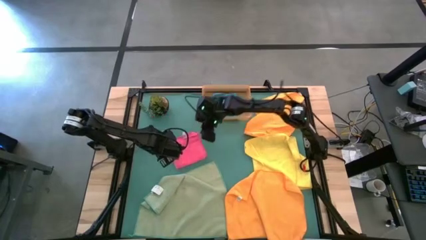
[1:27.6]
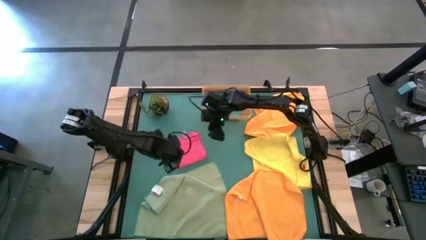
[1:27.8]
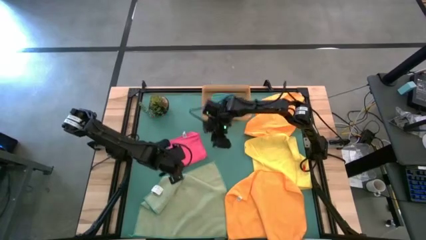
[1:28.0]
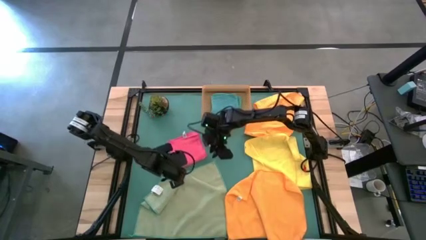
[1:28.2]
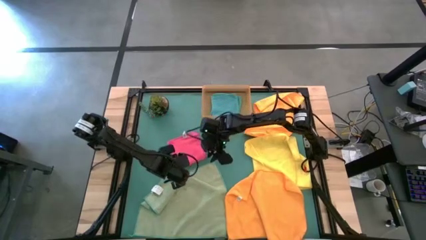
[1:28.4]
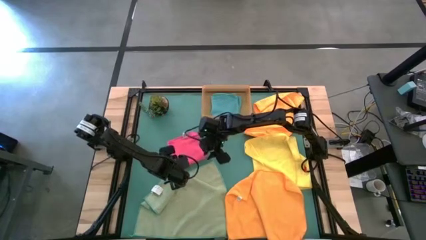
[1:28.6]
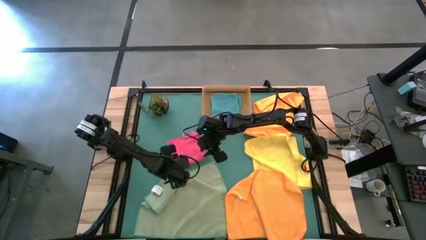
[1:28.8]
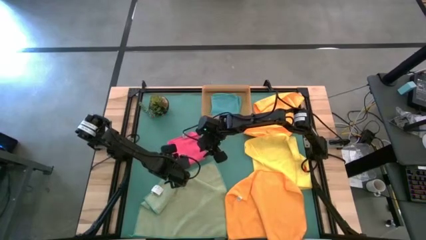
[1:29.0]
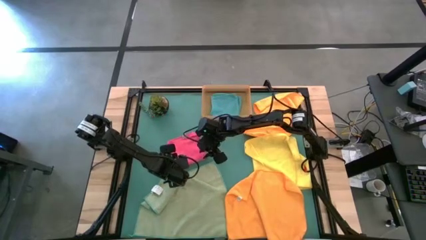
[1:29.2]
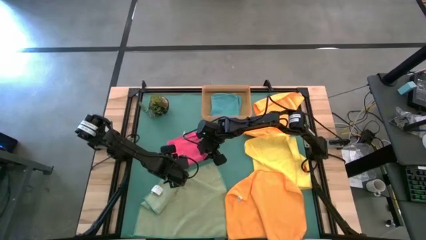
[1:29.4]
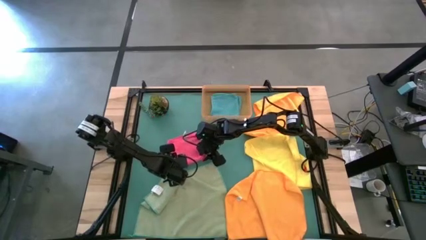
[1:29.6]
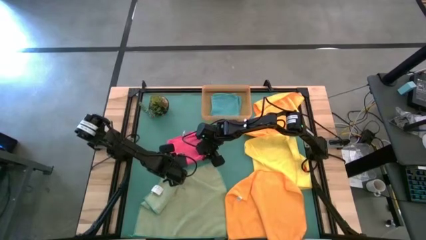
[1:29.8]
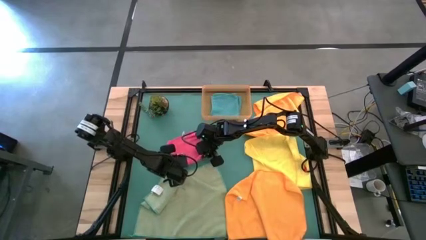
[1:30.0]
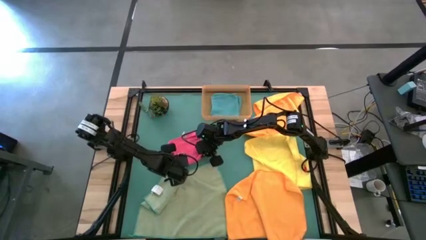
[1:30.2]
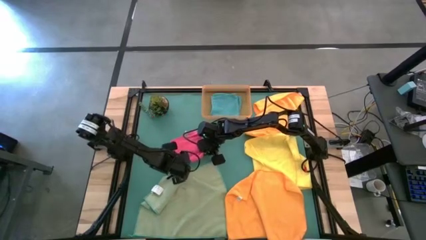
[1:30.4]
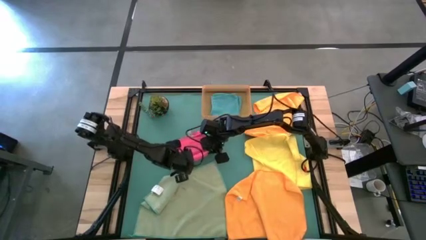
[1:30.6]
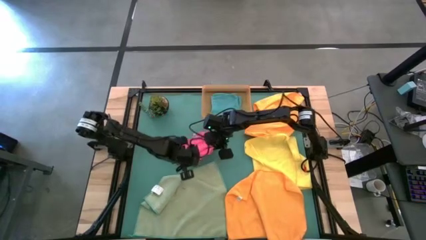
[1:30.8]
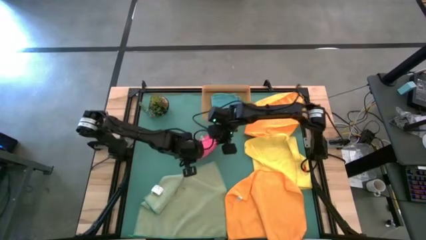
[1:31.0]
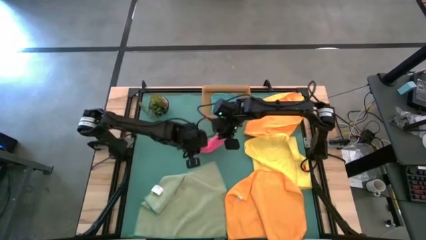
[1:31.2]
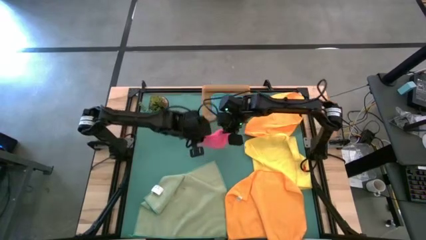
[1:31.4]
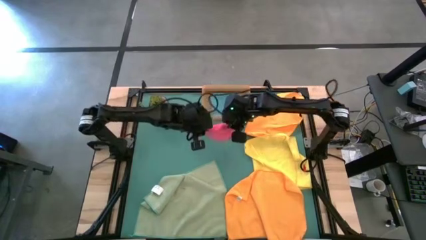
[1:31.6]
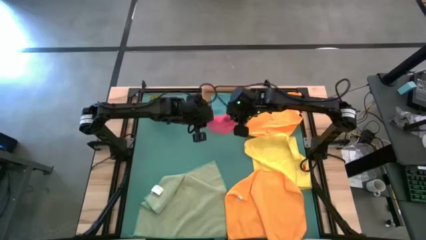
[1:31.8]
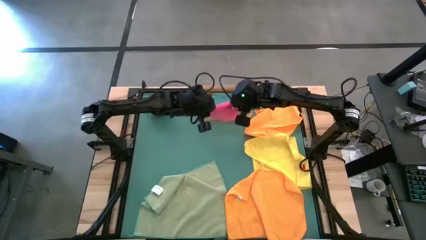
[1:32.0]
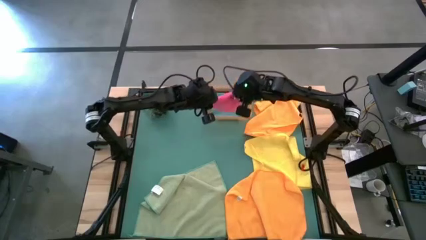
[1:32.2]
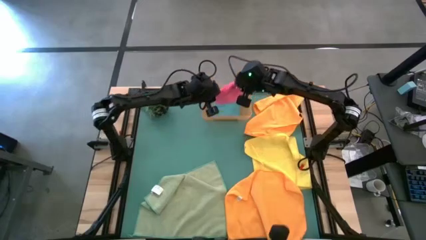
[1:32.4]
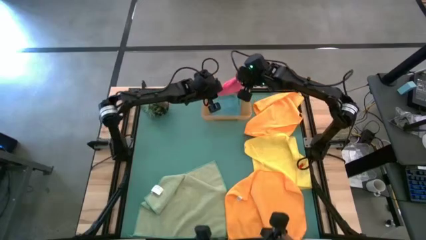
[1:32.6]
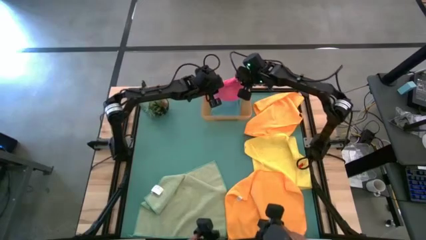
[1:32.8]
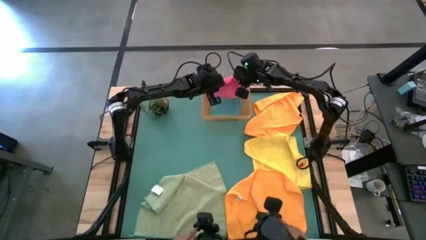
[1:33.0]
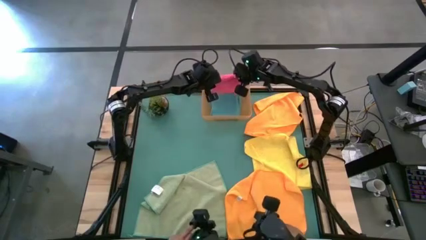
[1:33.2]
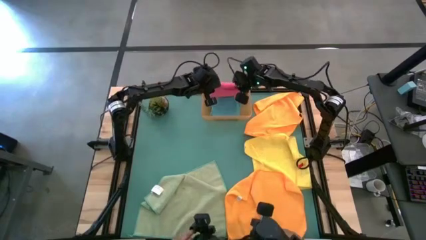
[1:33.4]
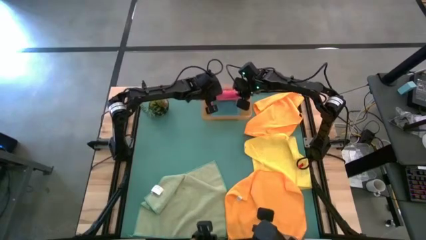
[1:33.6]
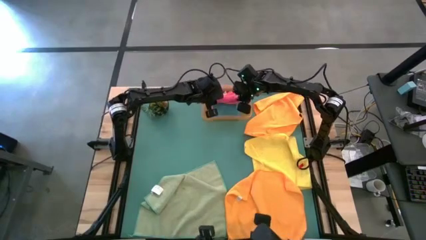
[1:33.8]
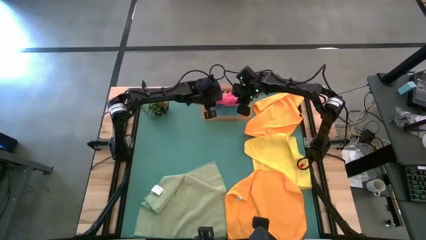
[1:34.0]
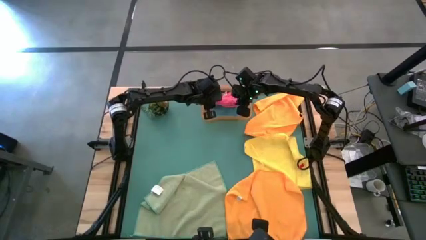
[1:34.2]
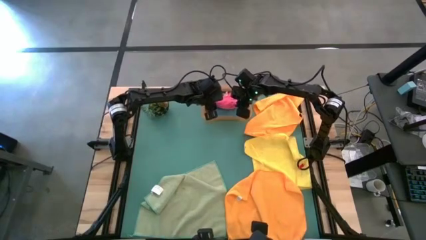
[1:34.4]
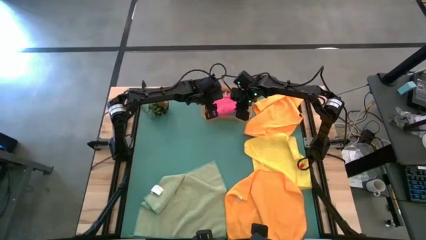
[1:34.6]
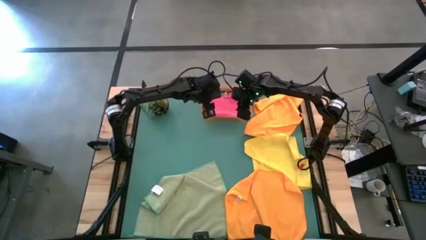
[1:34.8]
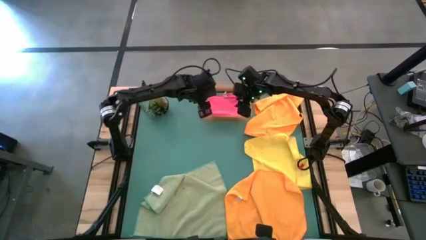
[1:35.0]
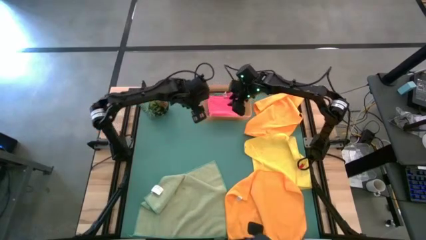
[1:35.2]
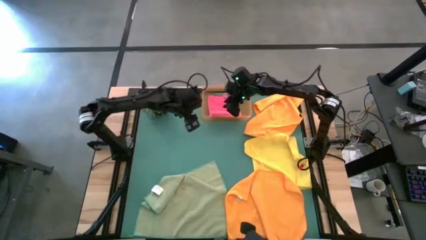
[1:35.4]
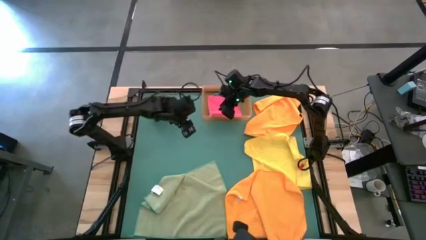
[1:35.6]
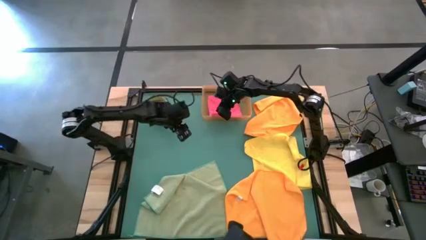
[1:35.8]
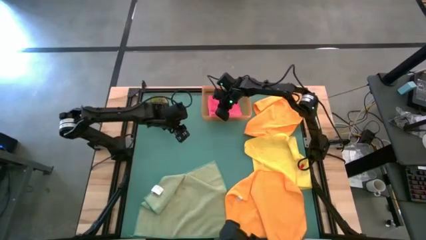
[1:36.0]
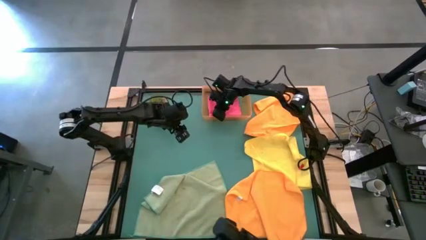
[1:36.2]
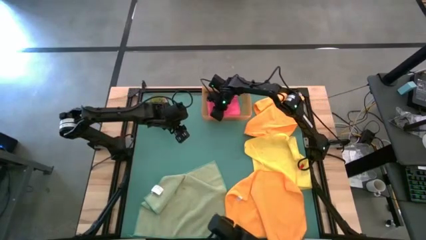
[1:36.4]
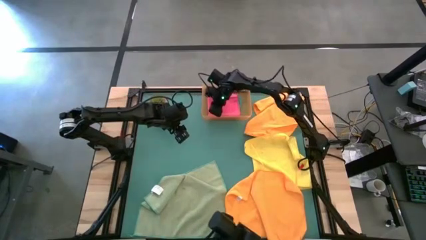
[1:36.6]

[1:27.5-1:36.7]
Task: Fold microfiber towels
Stack the pink microfiber towel on top of the blue microfiber towel in the orange bin

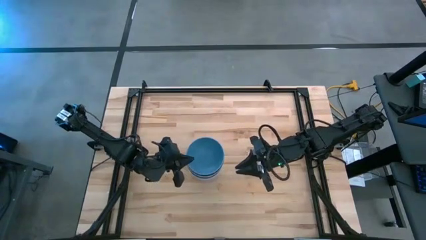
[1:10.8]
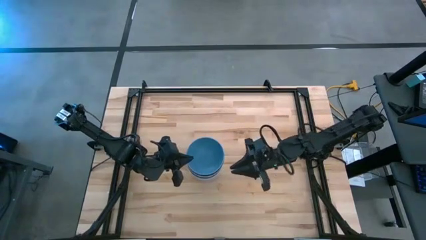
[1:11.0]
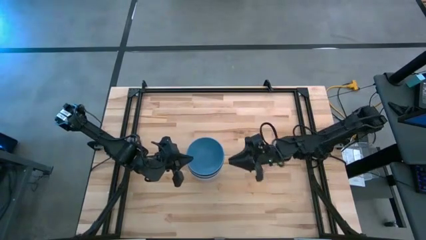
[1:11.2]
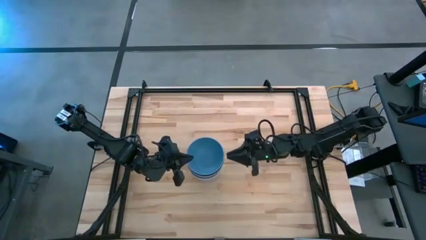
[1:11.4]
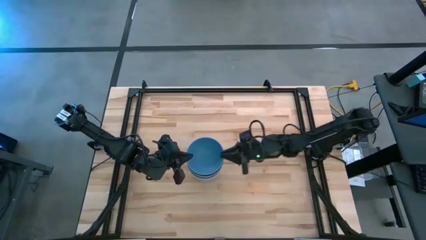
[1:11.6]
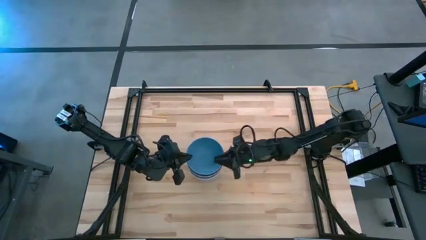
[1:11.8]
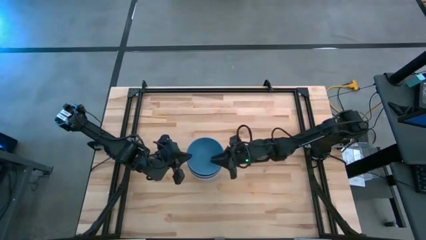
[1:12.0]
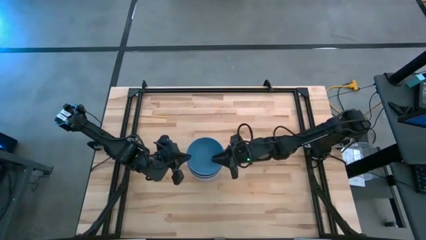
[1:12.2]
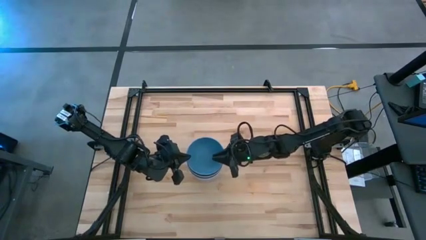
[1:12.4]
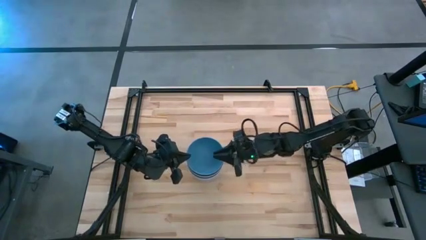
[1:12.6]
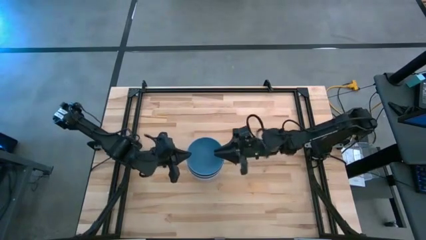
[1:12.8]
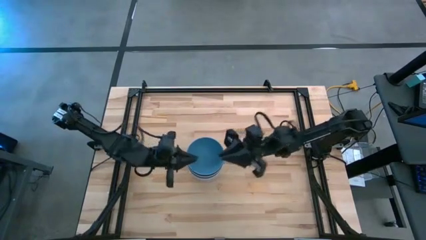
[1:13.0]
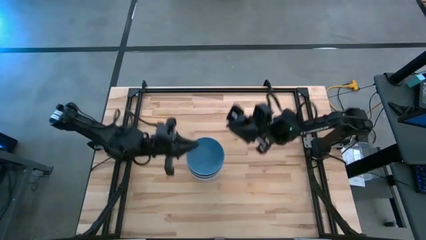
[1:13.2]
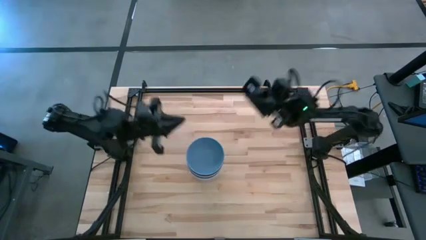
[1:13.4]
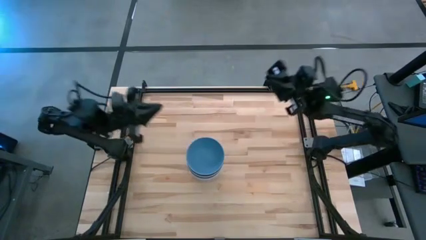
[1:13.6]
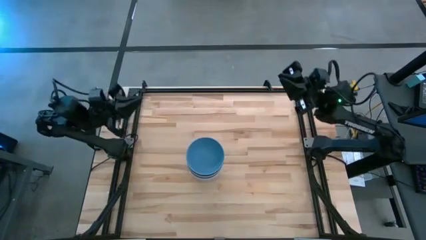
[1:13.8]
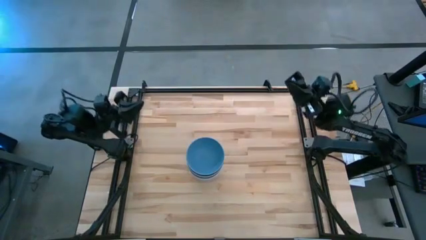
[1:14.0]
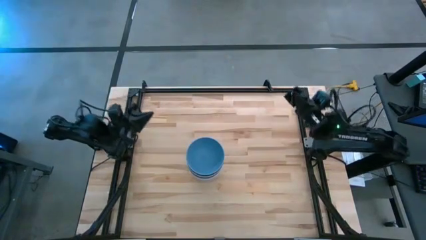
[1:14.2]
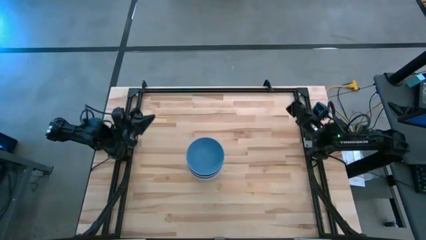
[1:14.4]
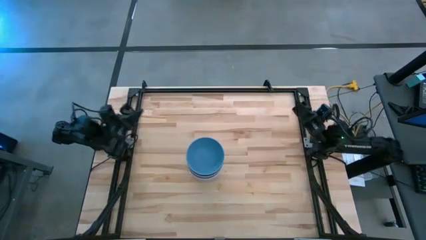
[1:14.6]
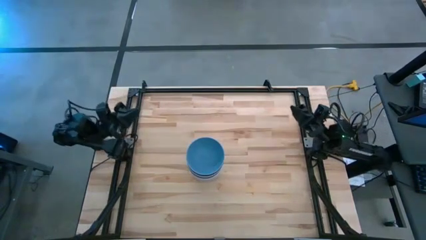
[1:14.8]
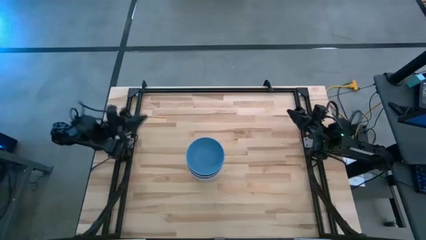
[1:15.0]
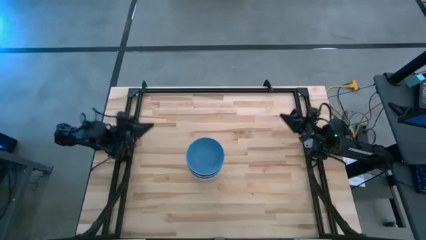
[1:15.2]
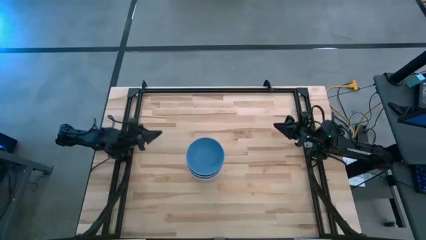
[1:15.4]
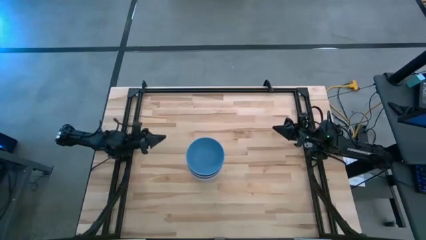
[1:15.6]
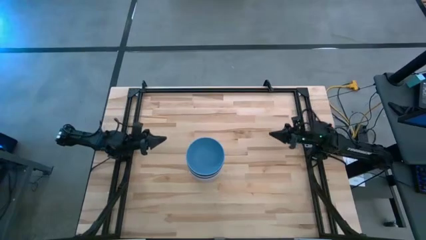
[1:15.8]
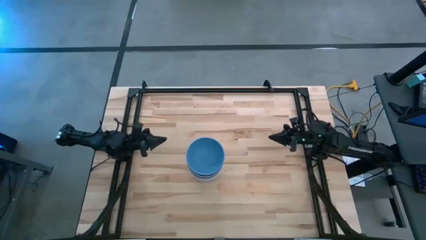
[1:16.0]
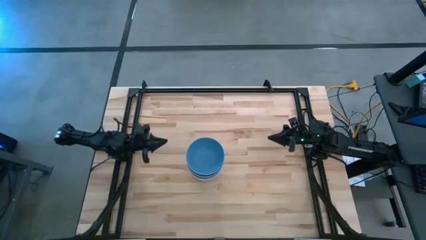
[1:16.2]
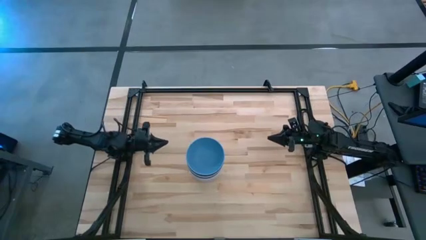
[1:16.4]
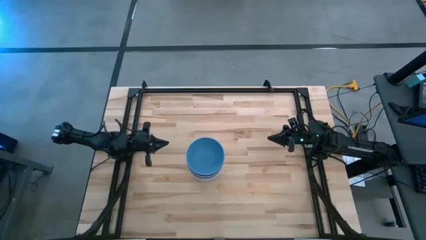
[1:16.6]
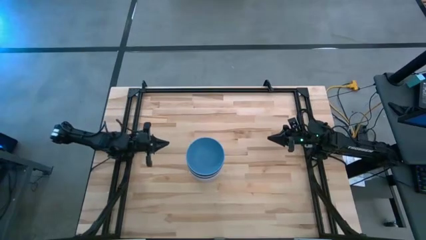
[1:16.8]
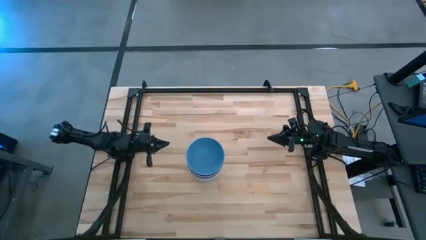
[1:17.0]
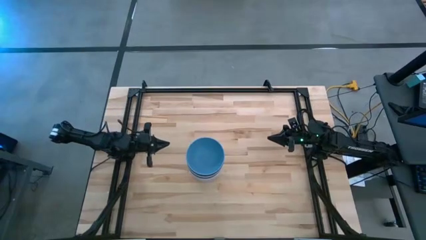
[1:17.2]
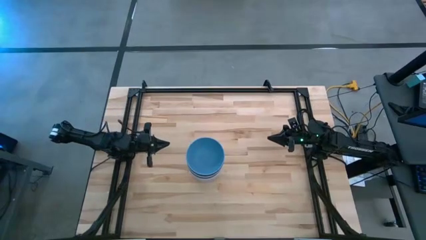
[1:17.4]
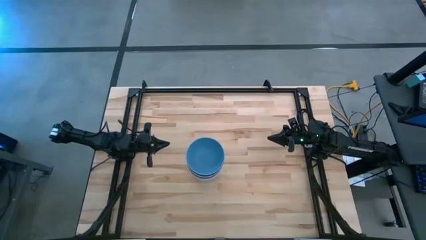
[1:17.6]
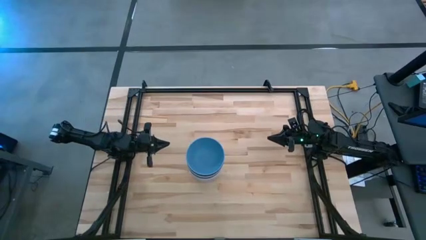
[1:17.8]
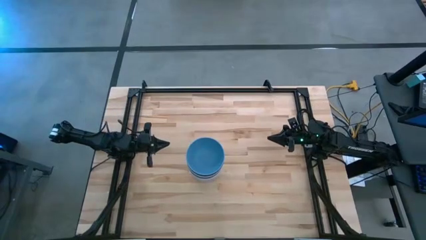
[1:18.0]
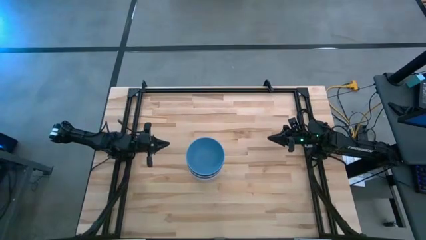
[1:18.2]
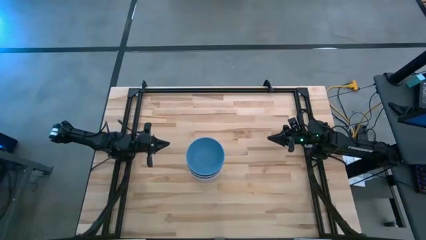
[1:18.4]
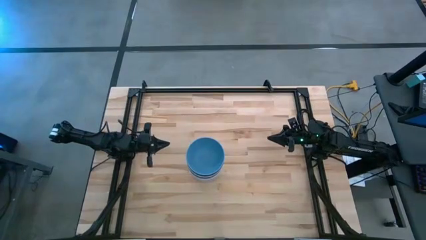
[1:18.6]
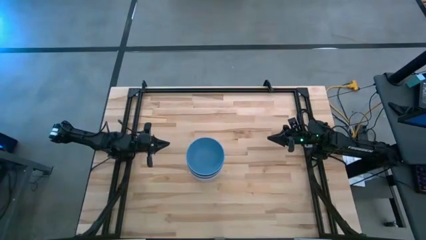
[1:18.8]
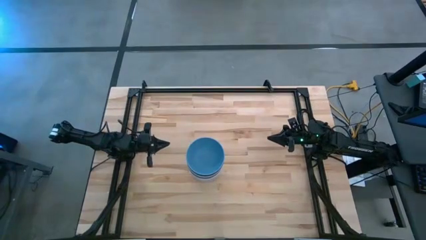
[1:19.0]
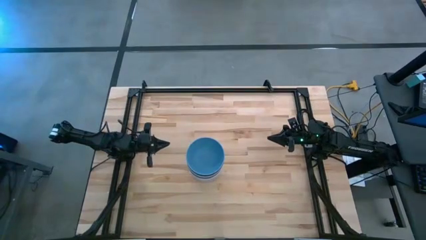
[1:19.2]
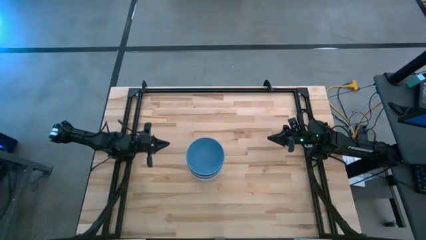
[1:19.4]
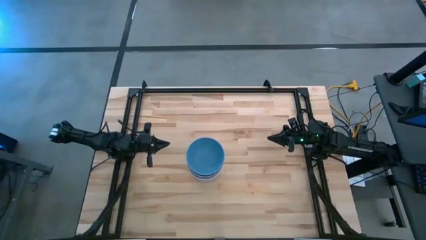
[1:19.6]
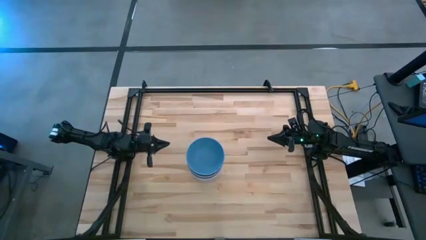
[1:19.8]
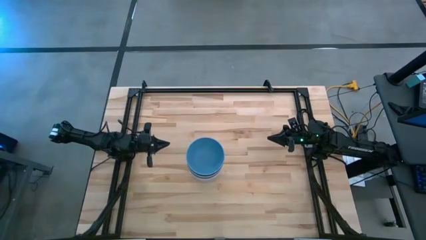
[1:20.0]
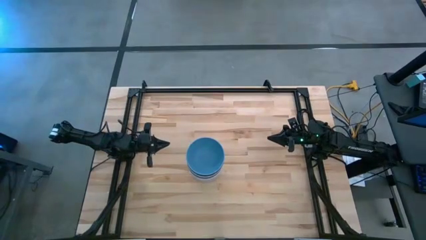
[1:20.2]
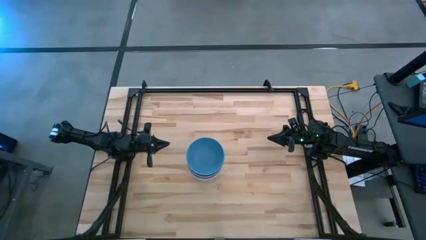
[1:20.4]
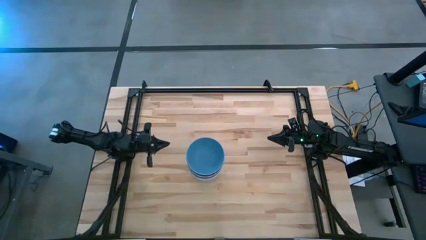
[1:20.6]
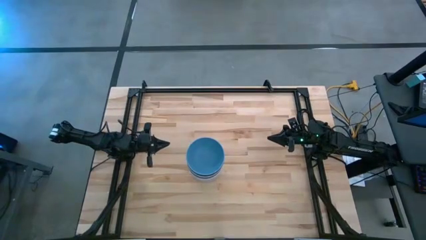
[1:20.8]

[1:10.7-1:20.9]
Task: Nest bowls inside each other
Return to Home Position
